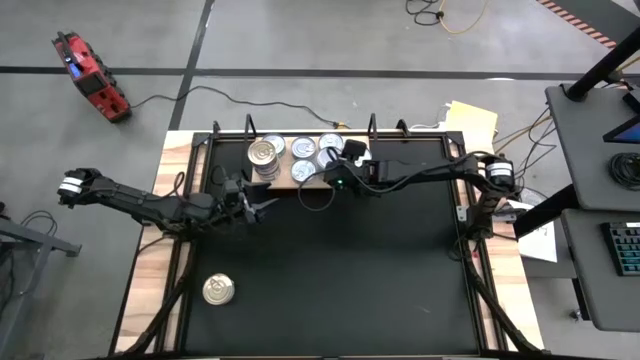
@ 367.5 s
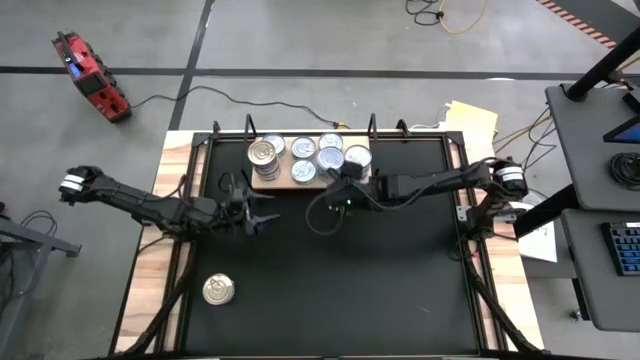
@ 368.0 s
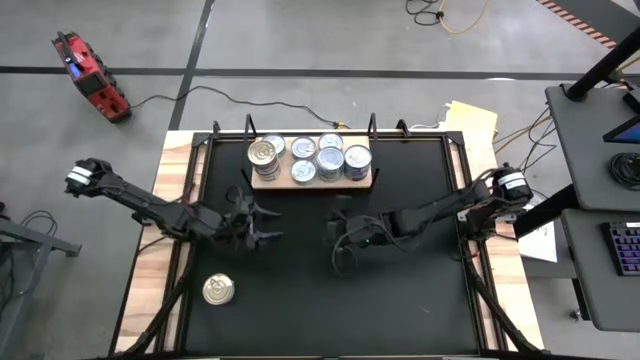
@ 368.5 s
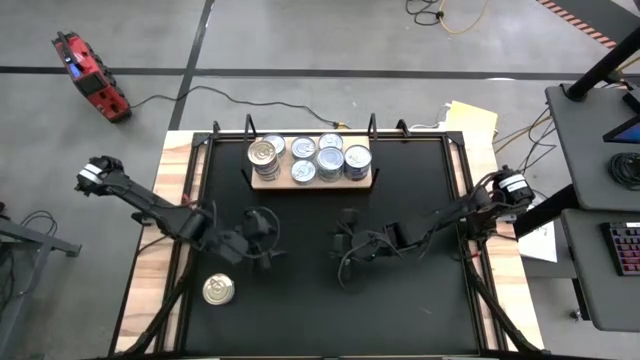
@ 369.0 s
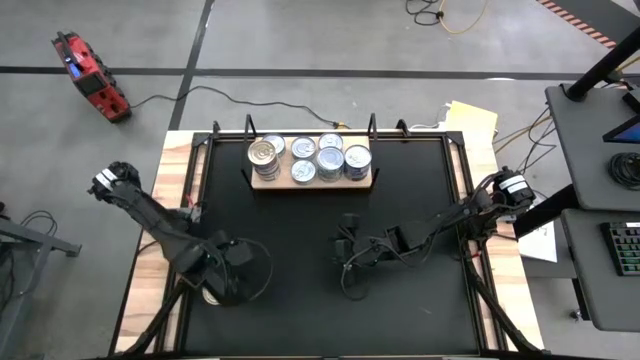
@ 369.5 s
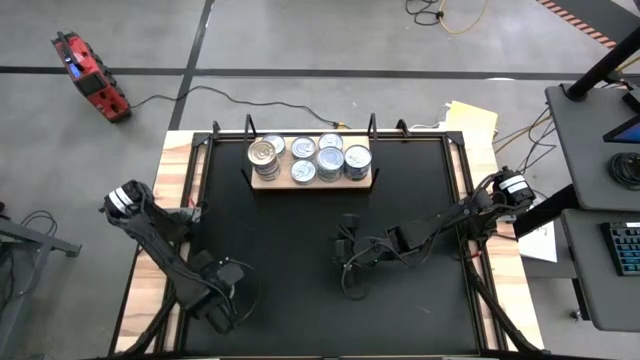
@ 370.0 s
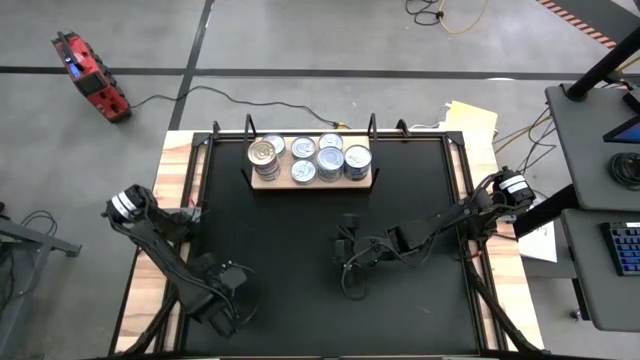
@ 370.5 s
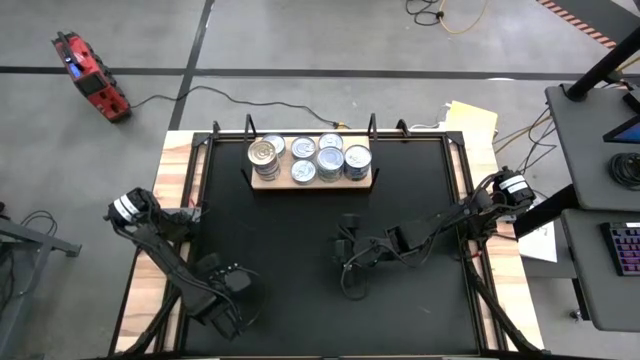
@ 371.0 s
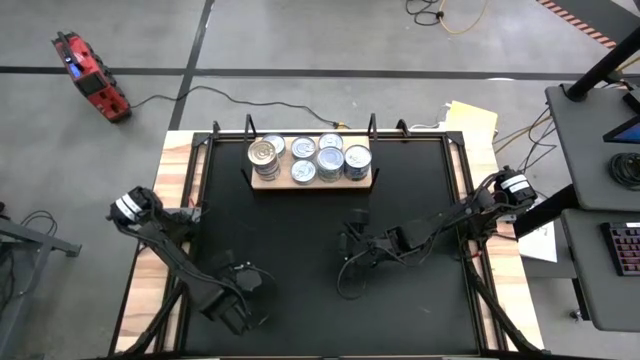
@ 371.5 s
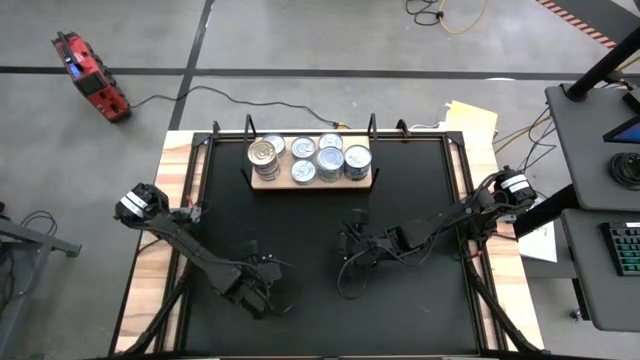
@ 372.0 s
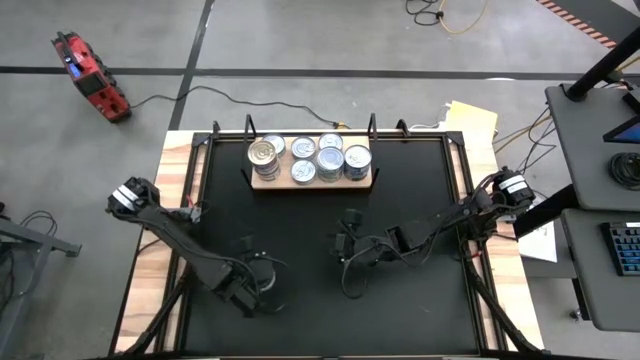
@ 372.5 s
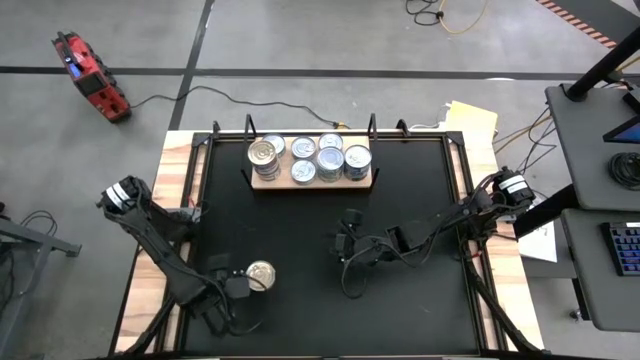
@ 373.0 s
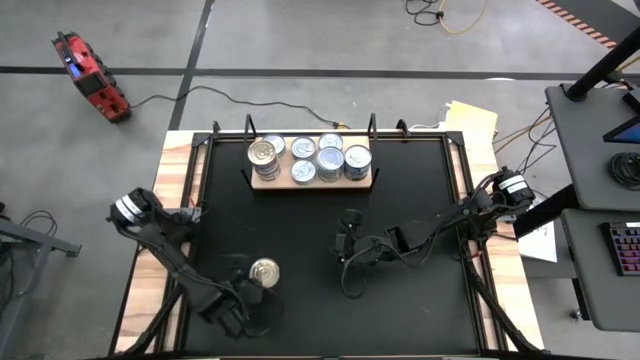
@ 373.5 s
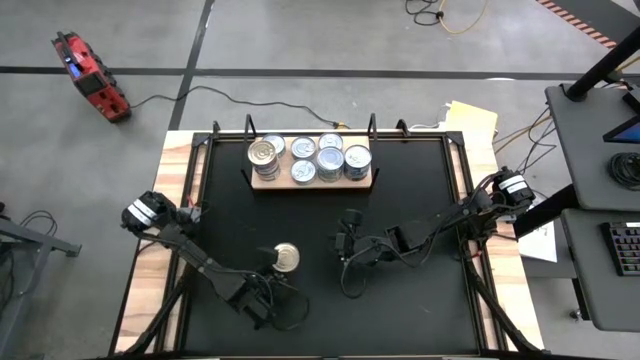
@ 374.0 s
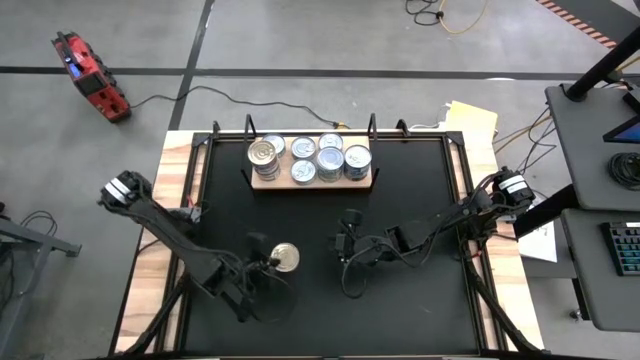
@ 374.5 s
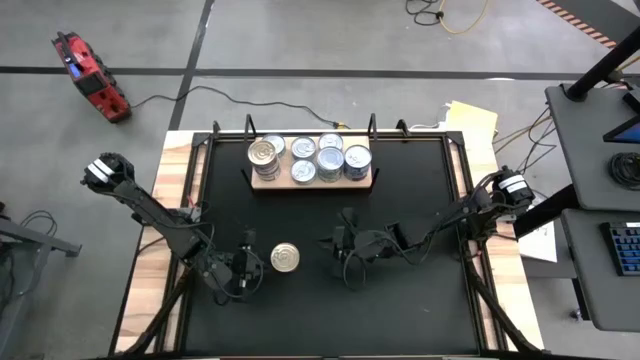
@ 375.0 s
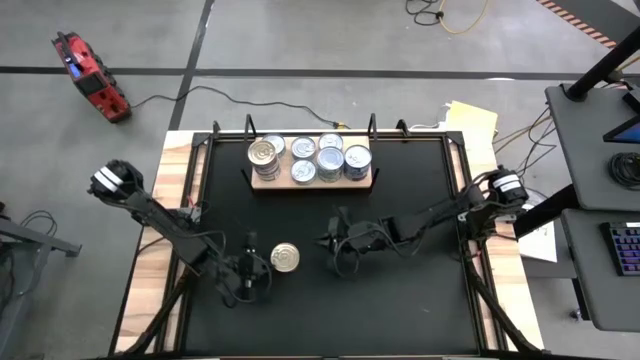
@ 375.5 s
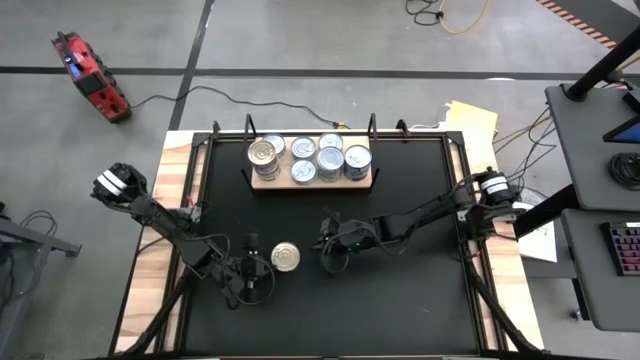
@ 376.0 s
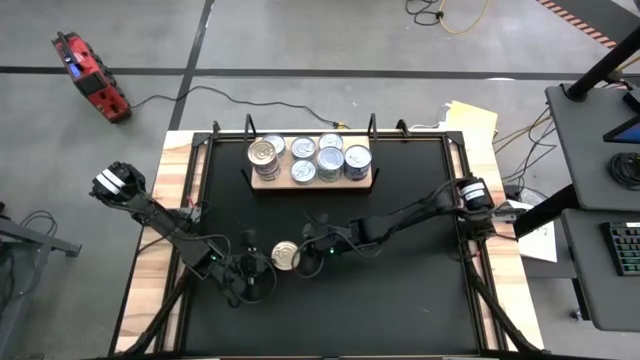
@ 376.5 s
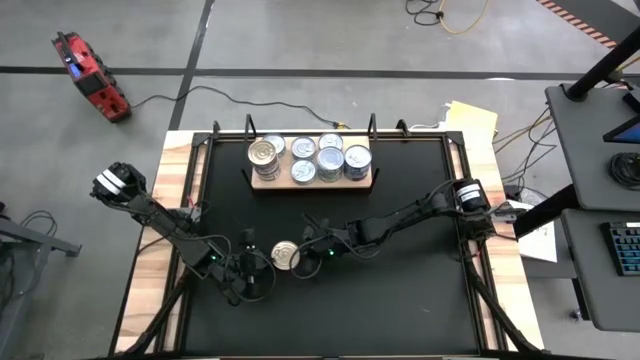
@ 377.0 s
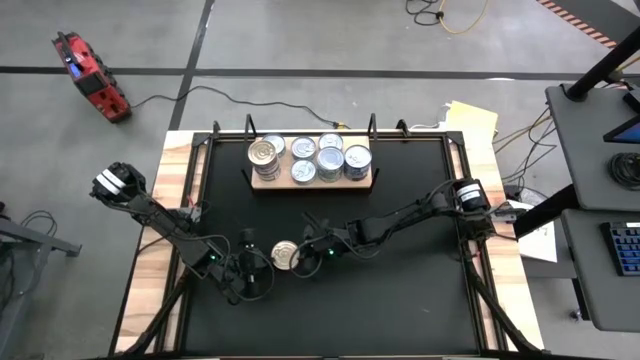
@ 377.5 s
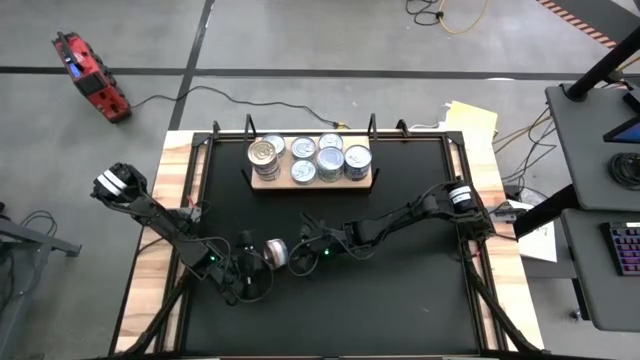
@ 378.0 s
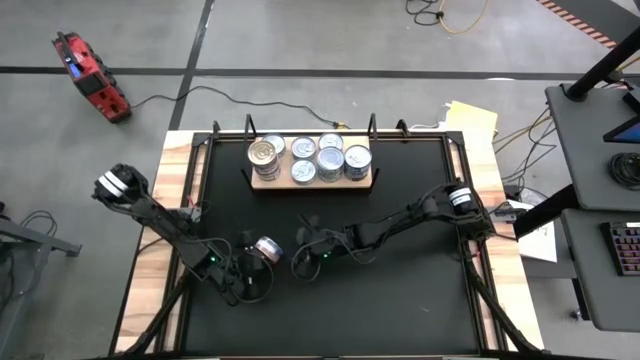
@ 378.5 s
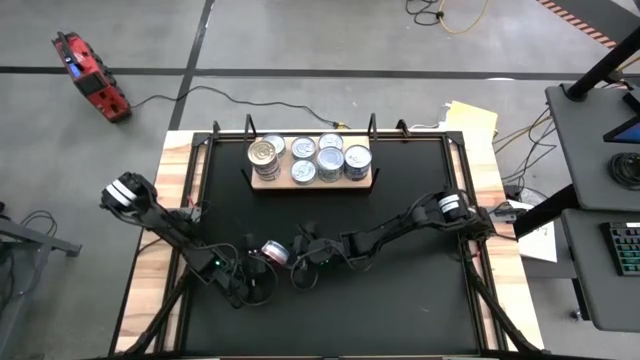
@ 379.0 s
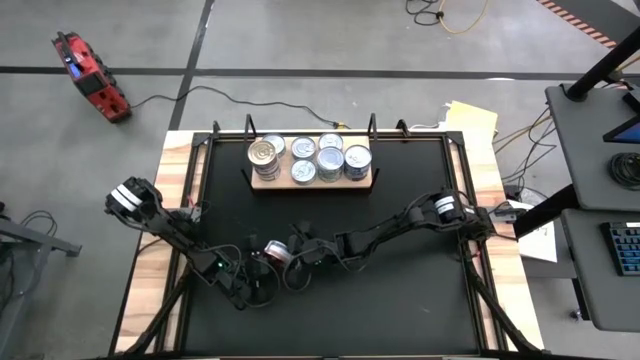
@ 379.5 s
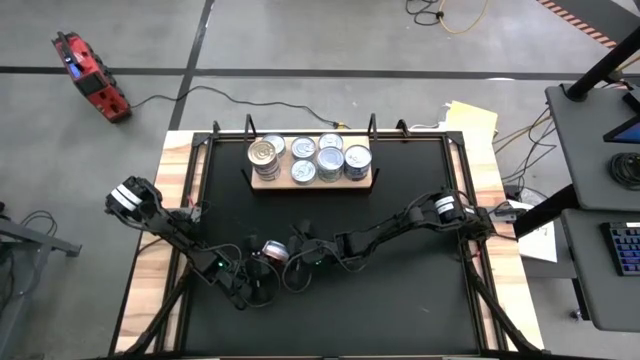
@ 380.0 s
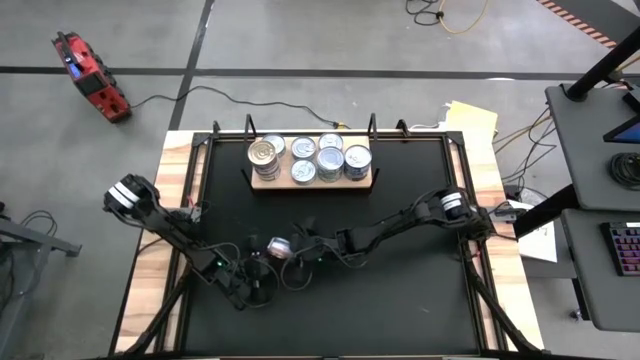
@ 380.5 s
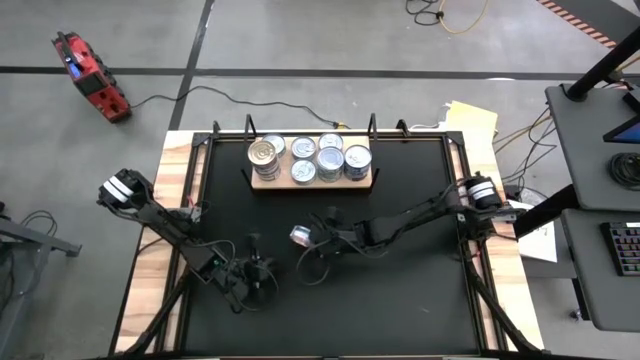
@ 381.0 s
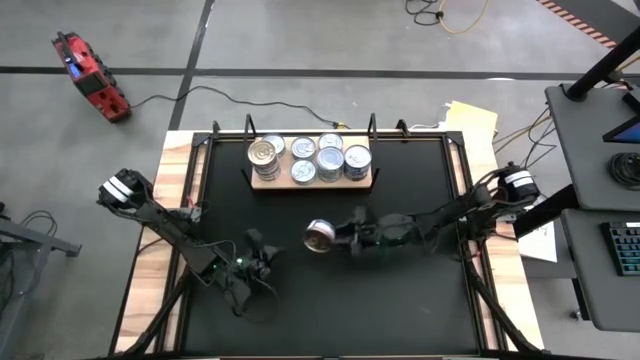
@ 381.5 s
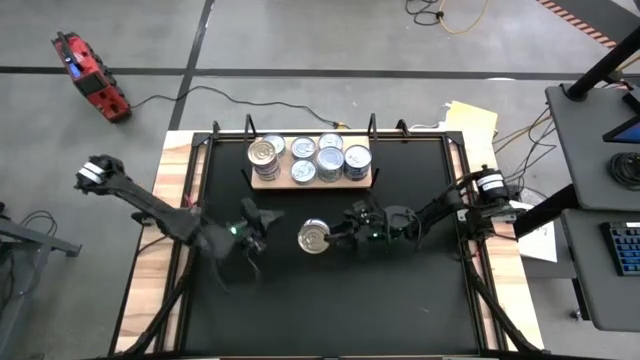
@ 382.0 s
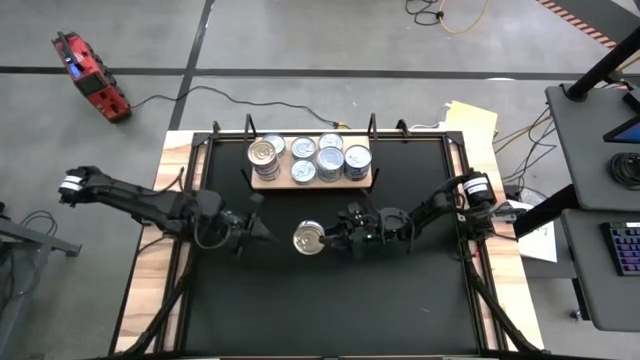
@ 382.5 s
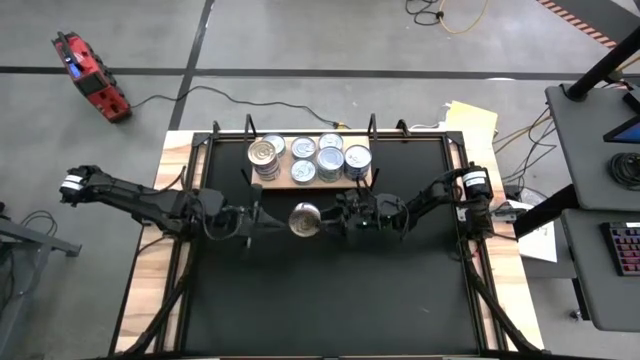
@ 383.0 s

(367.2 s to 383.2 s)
Task: Stack canned seafood by type on shelf
Stack the blue tuna can on top of the other blue tuna cans on the shelf

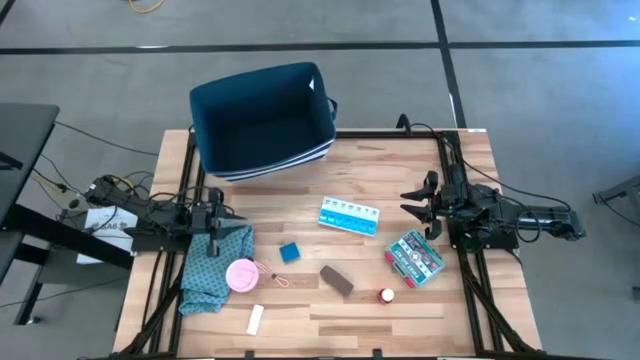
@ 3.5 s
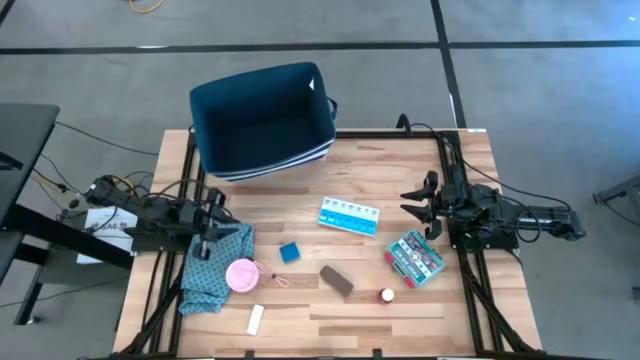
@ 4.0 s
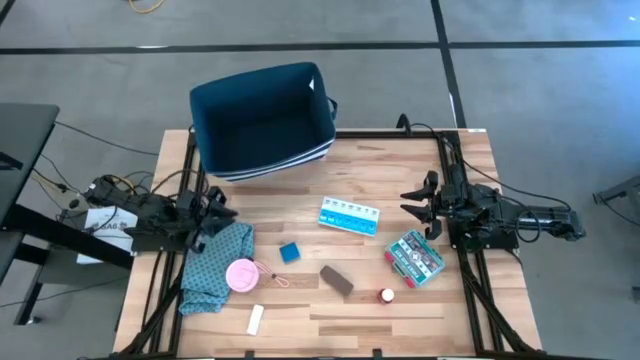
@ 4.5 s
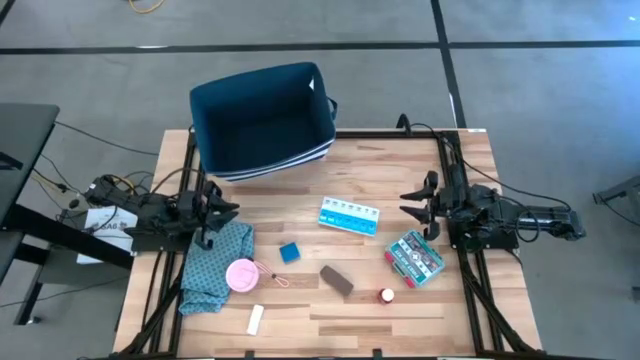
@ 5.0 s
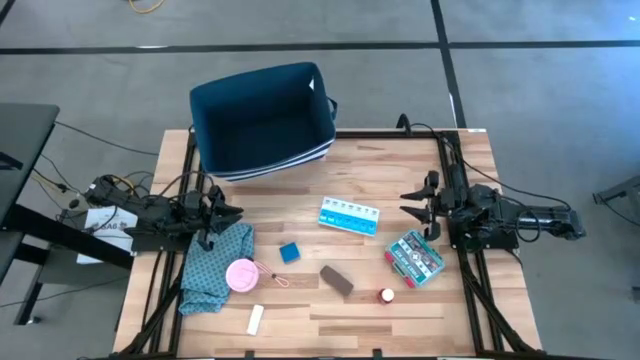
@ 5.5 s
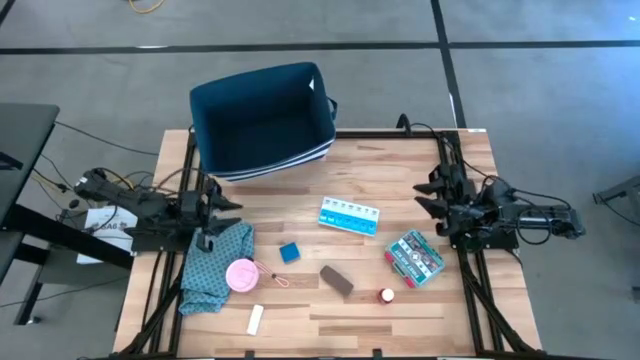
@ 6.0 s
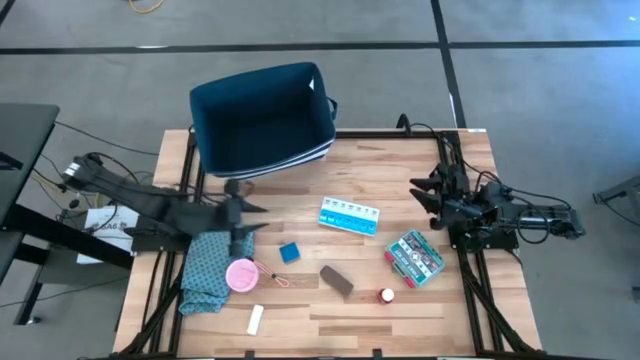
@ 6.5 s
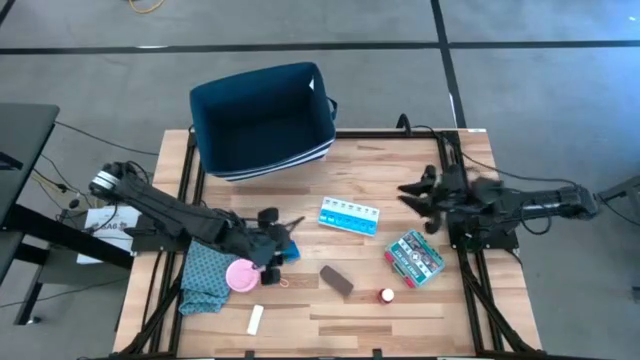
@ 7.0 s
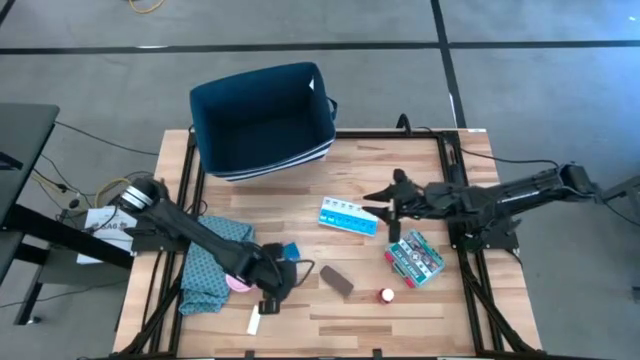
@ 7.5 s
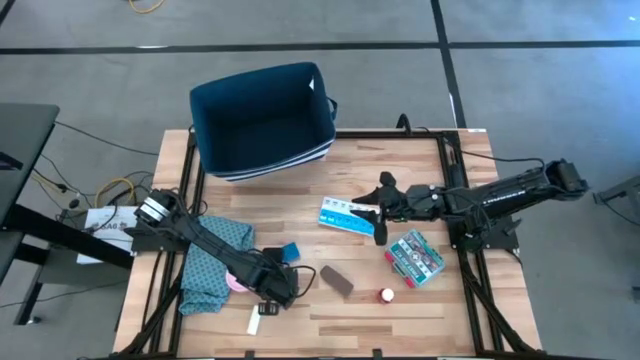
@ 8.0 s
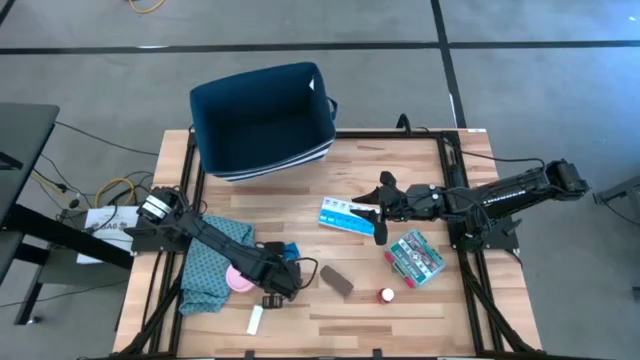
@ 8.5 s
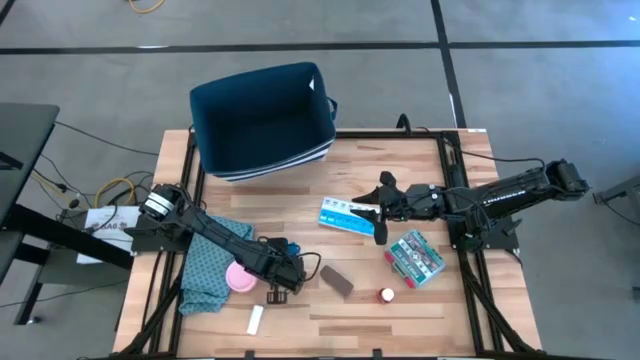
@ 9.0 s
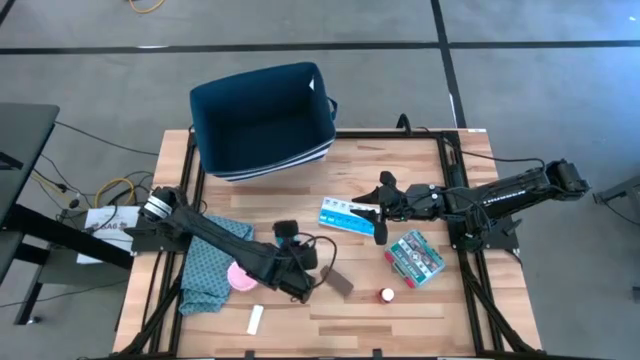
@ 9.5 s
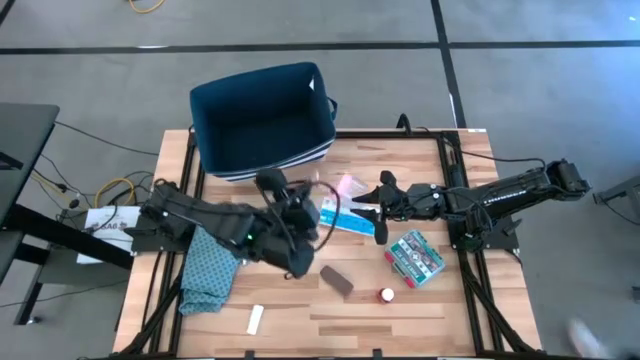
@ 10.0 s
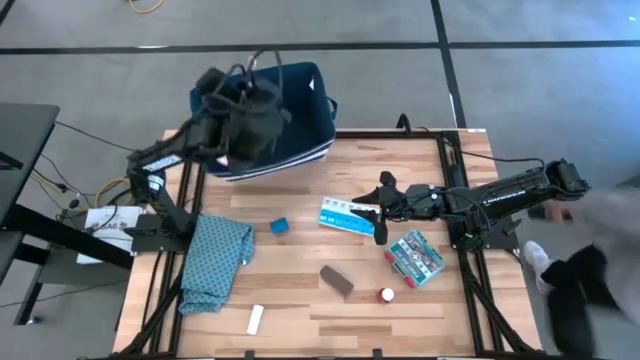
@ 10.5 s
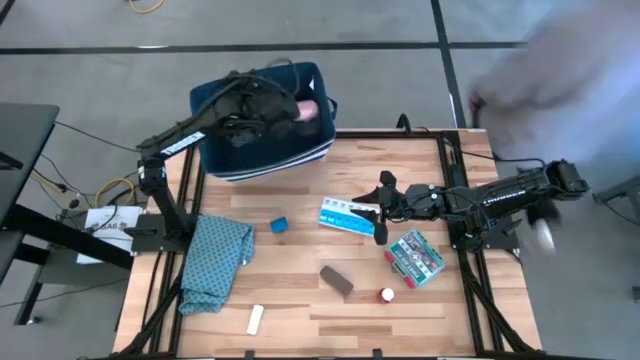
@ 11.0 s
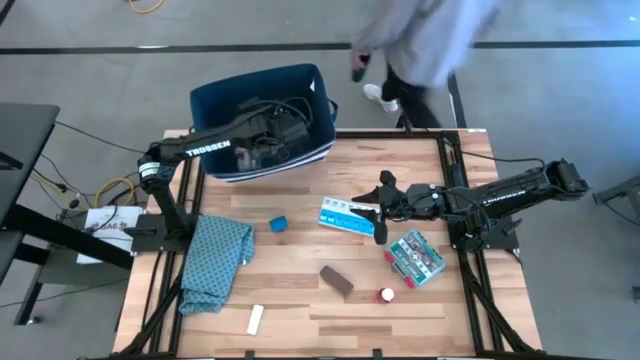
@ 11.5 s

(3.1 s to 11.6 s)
Task: Pick & place medical supplies in basket/bin
Put the pink pill dispenser into the blue bin
